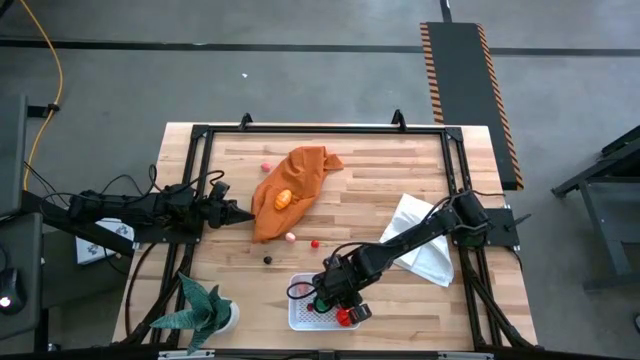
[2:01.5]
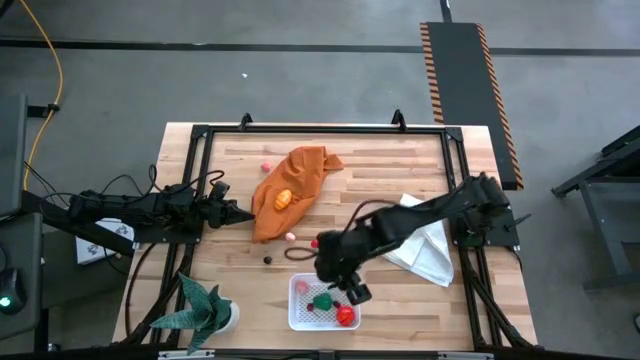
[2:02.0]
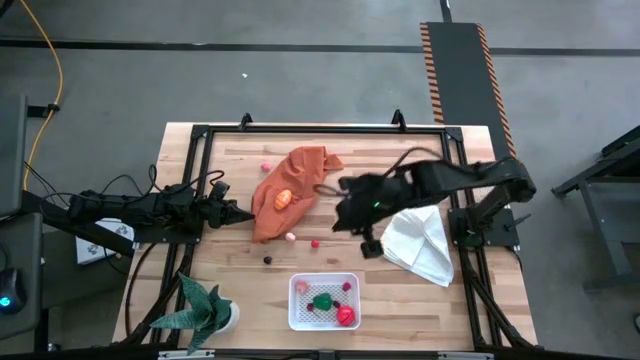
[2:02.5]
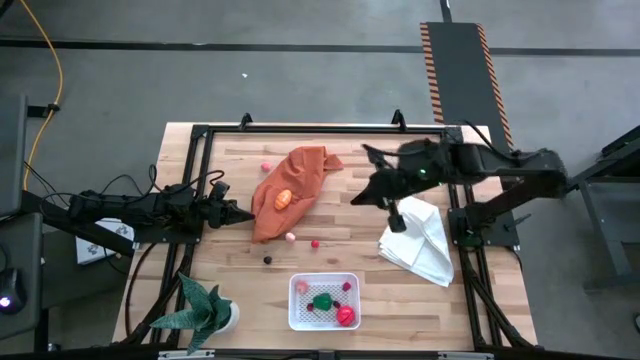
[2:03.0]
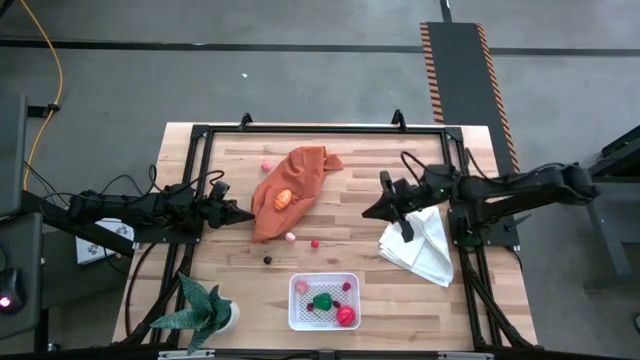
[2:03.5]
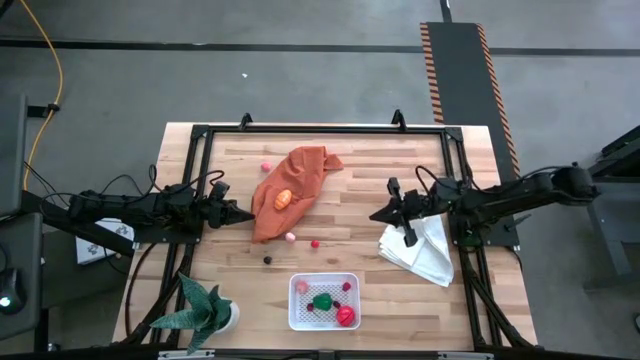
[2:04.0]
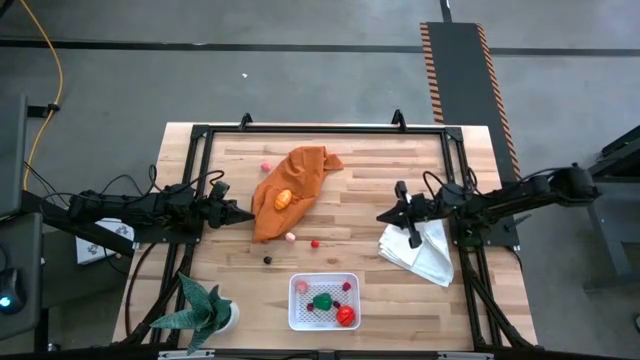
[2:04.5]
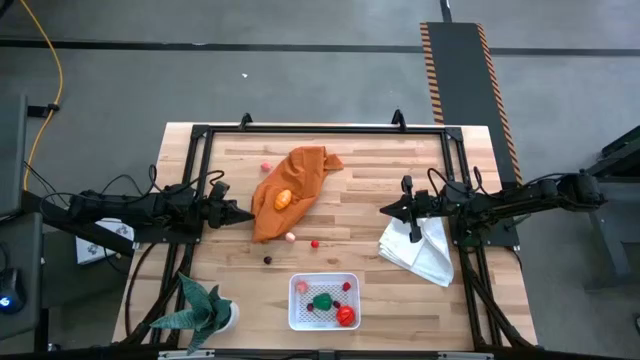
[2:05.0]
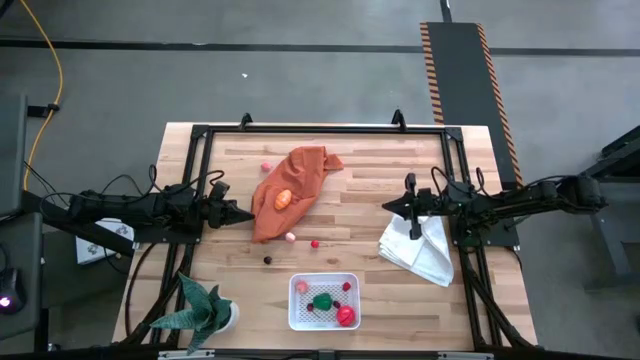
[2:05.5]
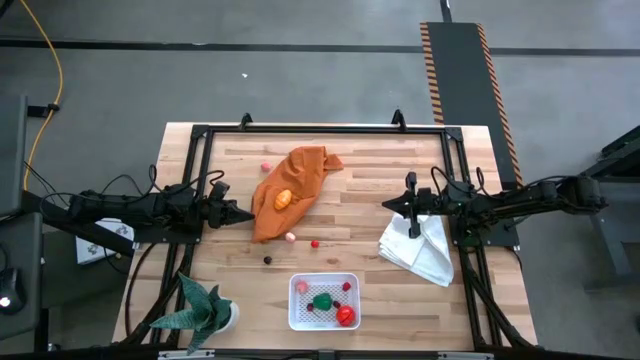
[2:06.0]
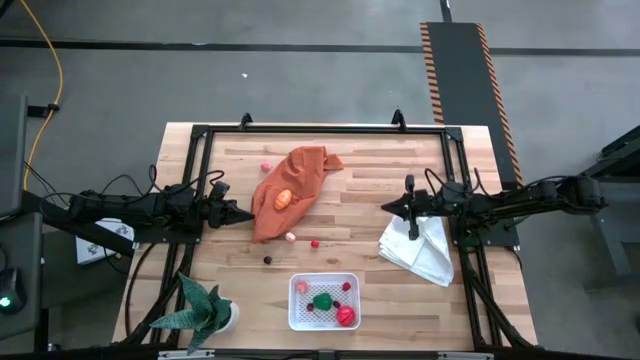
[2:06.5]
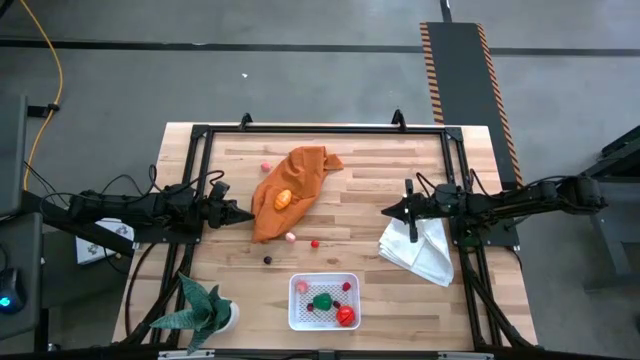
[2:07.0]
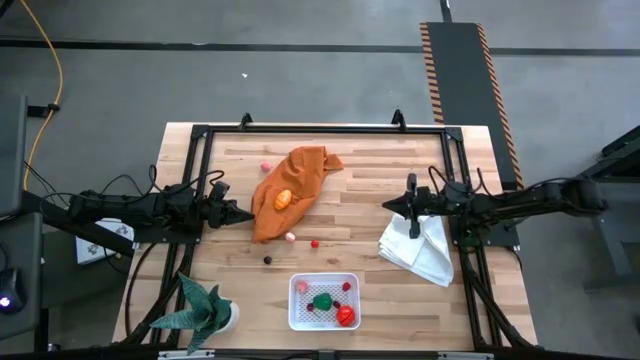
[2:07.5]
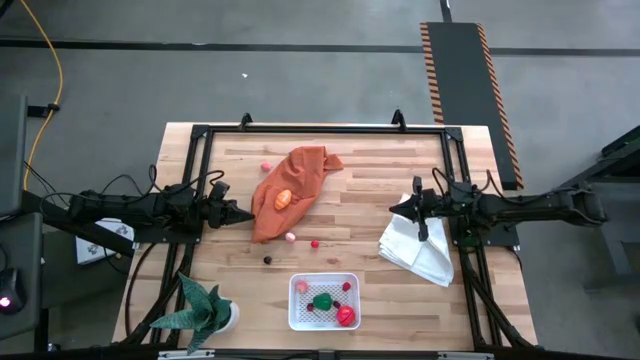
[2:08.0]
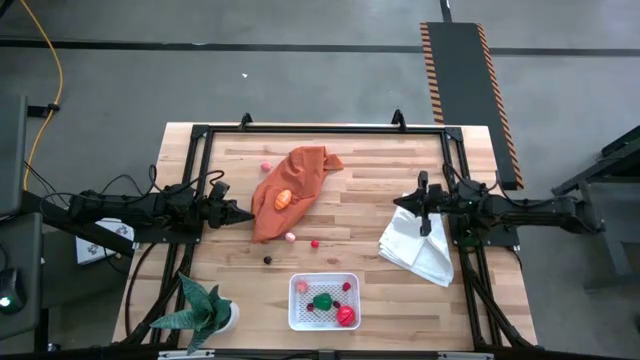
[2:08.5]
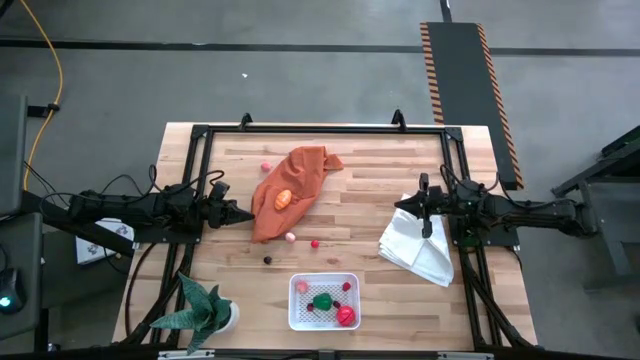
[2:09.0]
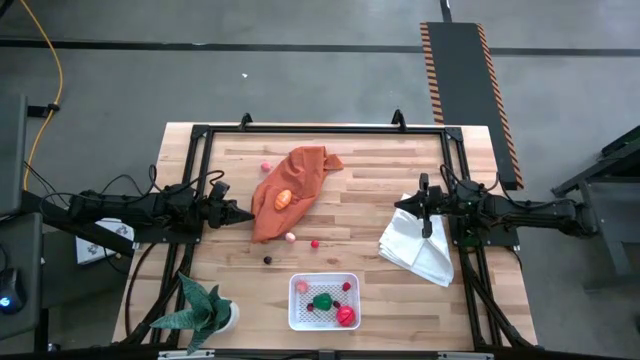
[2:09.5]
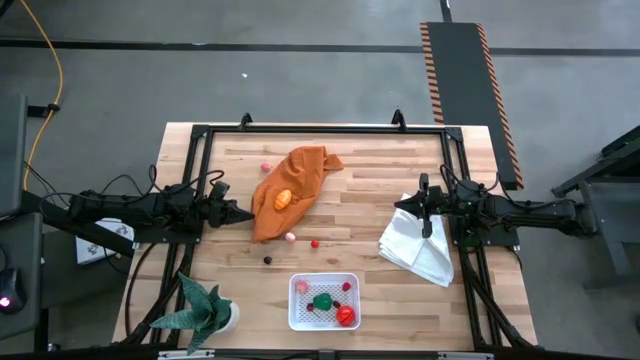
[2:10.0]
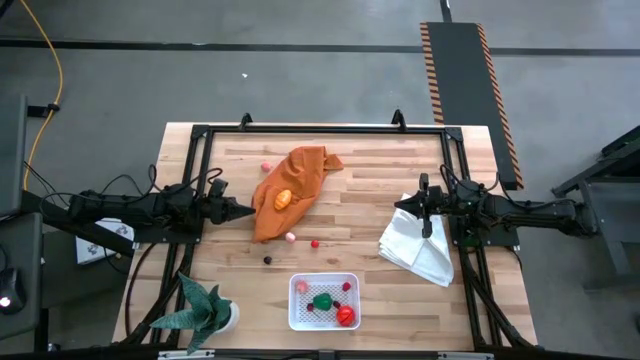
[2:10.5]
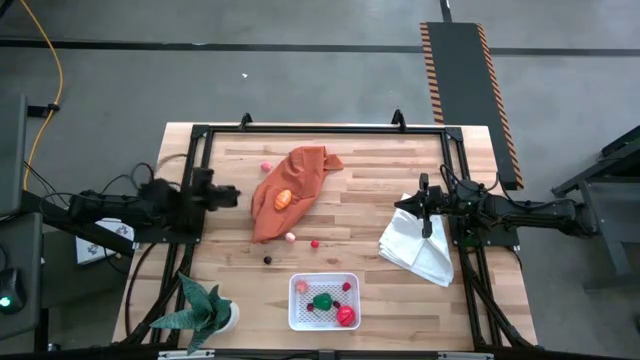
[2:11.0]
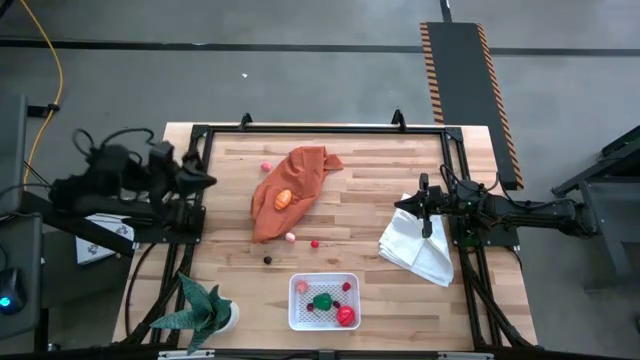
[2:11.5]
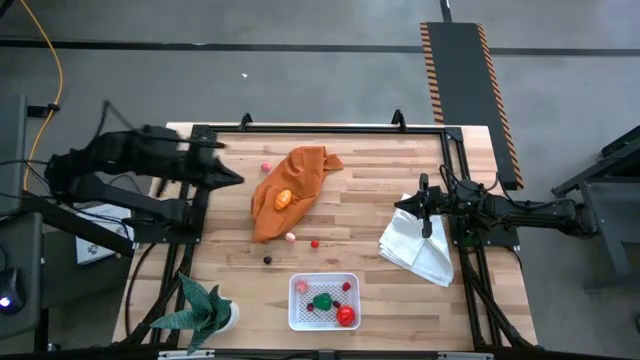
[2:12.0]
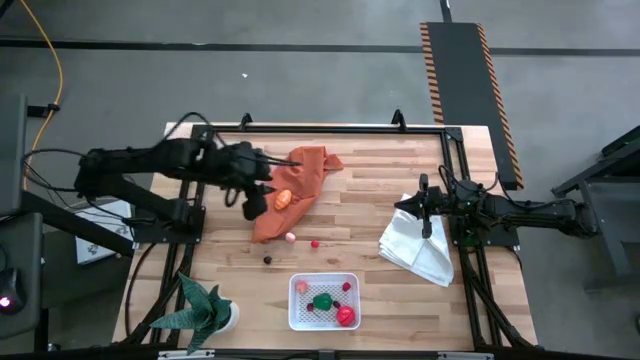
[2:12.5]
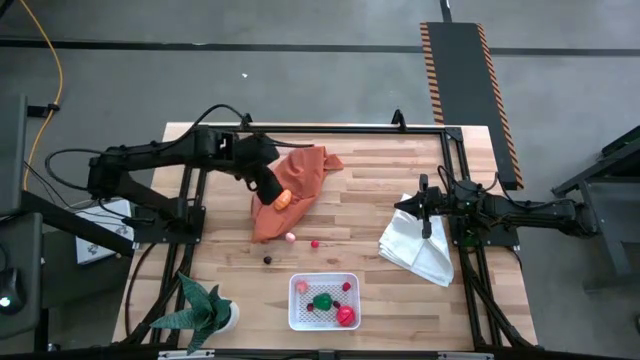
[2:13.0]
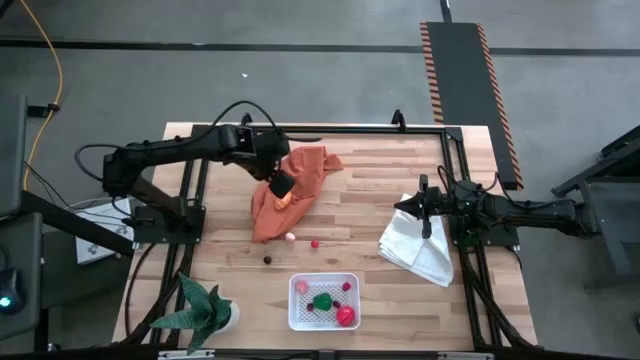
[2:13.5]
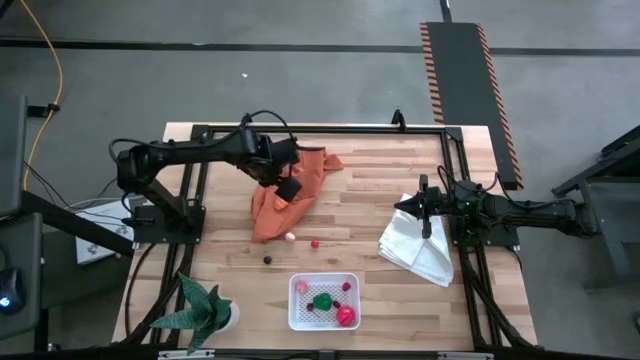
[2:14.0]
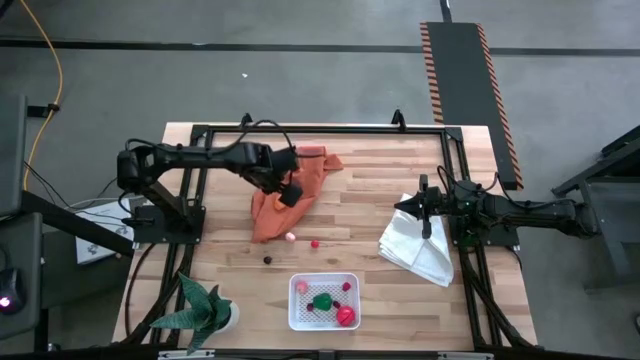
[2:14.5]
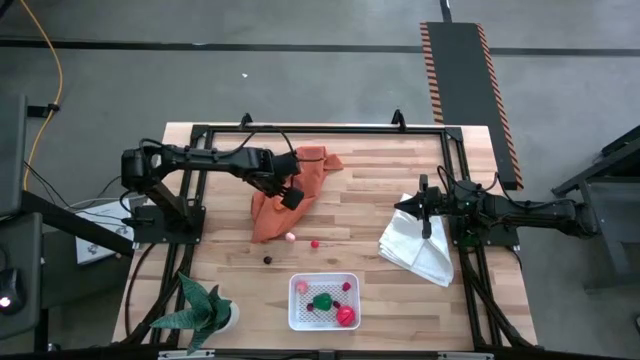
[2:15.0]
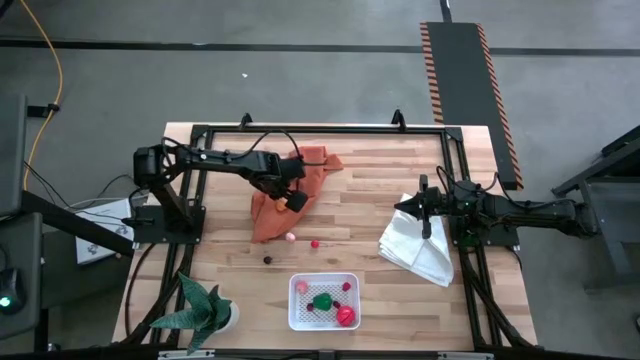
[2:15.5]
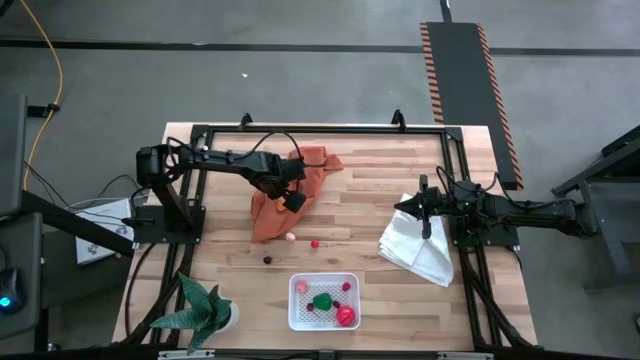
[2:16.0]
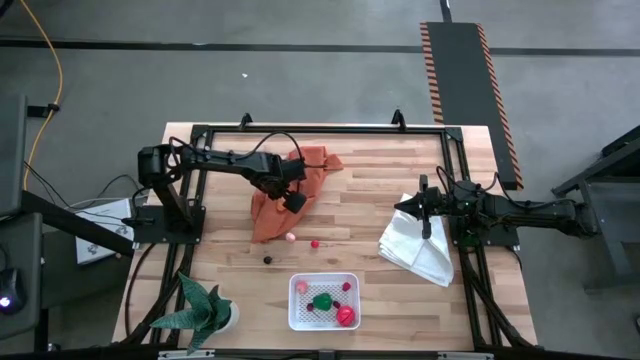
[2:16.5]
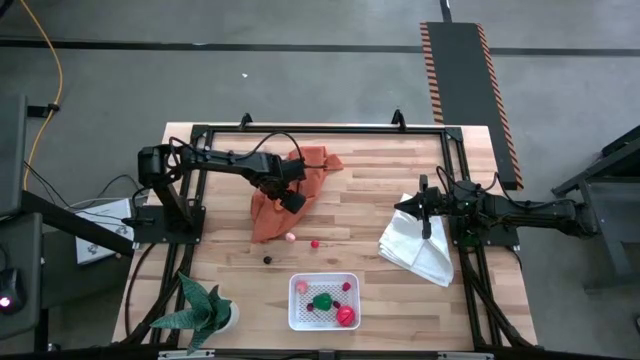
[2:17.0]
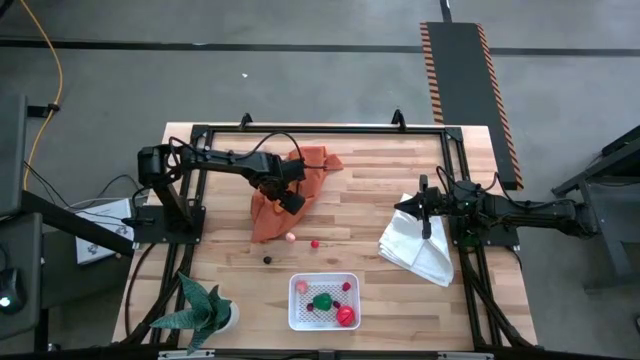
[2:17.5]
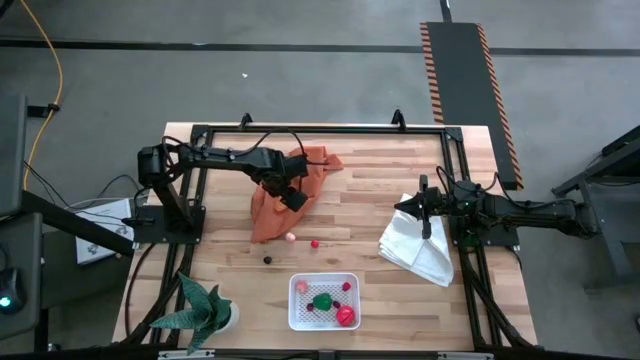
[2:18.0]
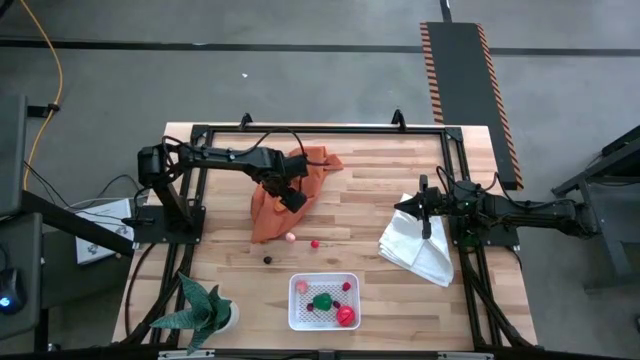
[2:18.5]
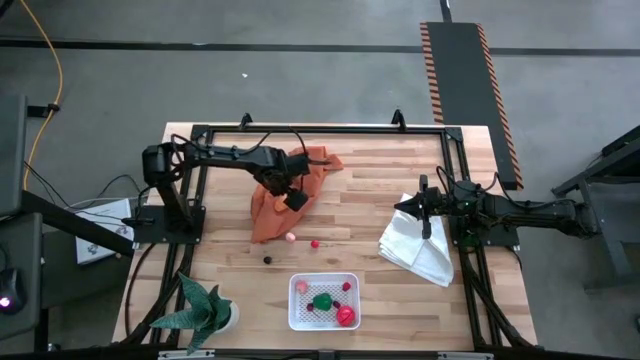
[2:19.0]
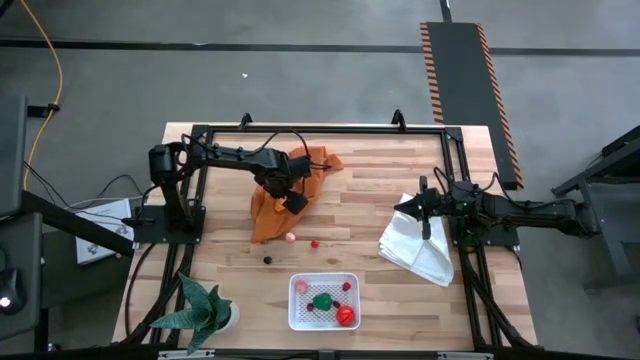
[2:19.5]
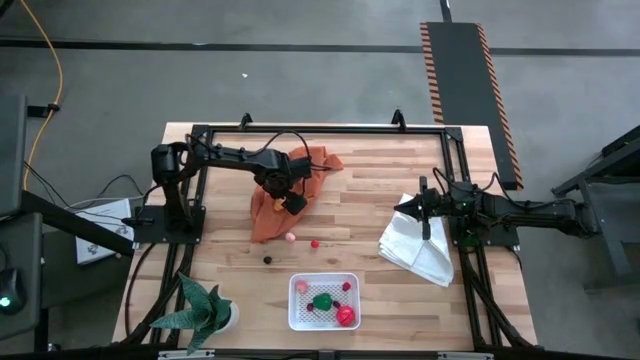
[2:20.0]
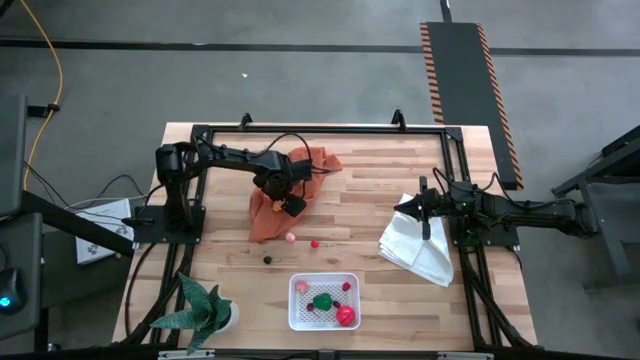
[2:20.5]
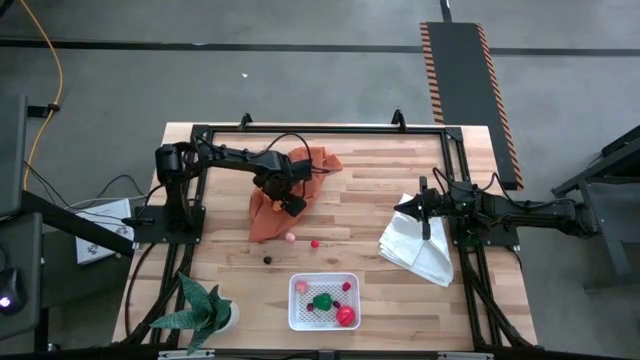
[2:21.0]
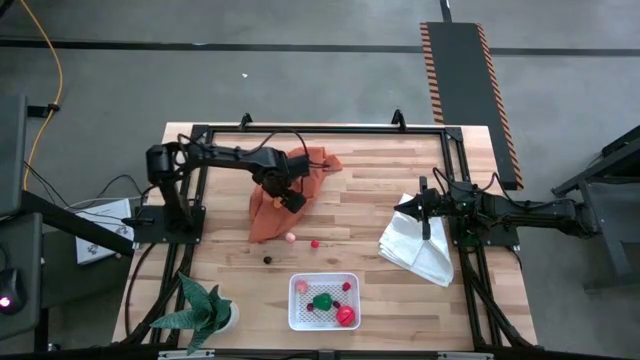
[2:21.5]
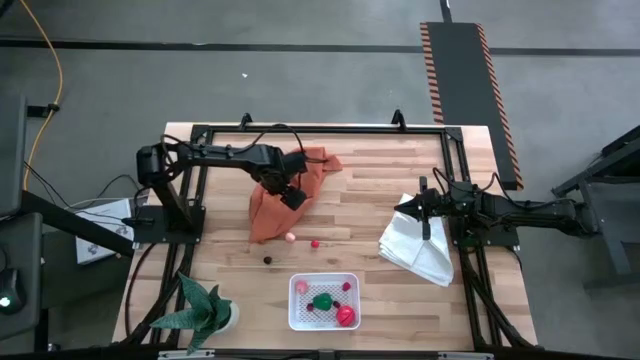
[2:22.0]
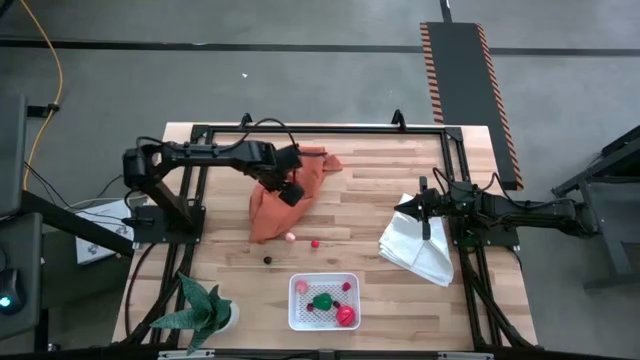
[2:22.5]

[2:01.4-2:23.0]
Task: Pick and placing Produce into tupperware
Put the yellow pumpkin into the white bin
